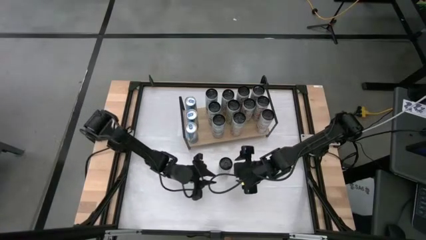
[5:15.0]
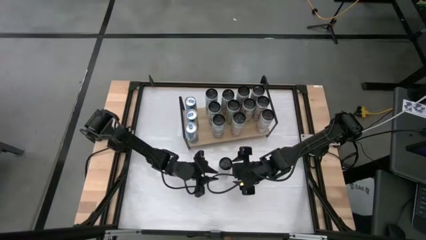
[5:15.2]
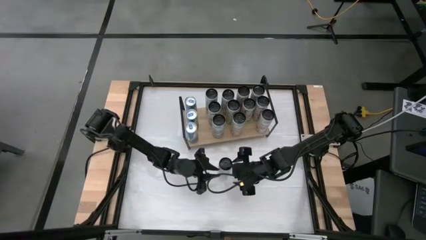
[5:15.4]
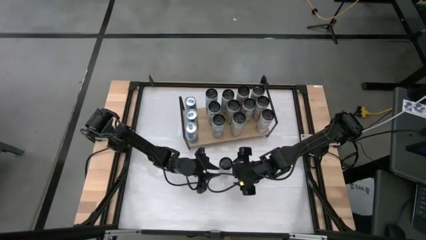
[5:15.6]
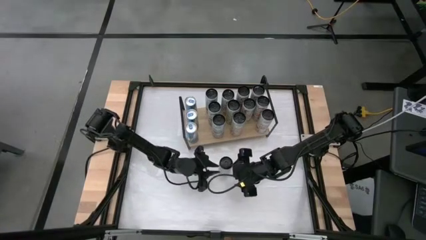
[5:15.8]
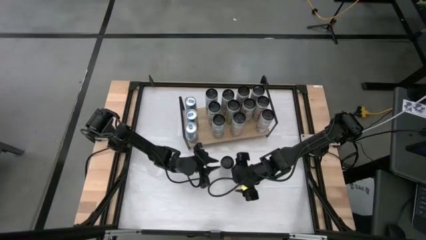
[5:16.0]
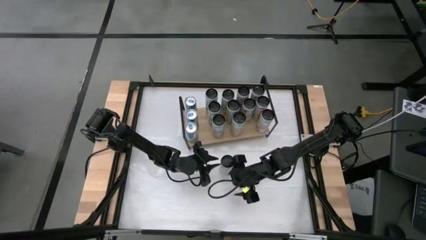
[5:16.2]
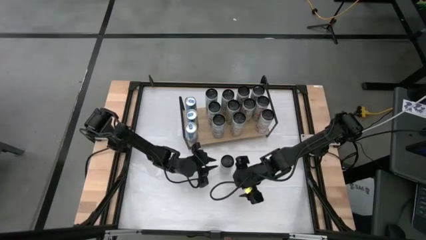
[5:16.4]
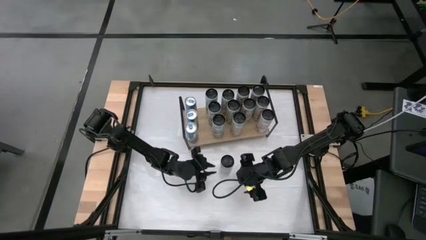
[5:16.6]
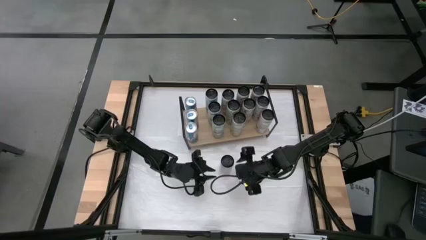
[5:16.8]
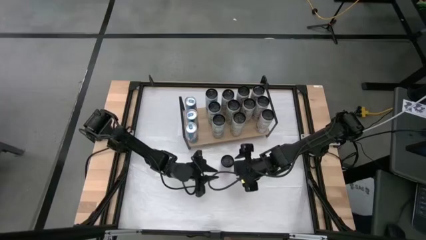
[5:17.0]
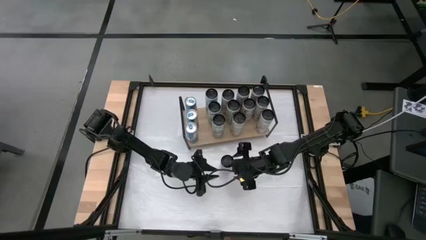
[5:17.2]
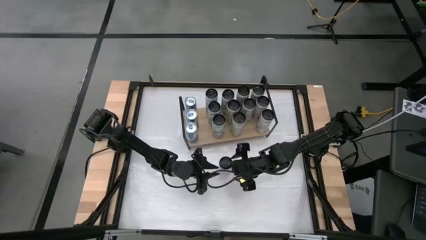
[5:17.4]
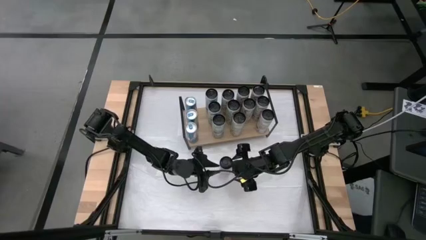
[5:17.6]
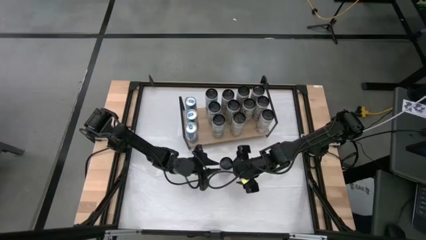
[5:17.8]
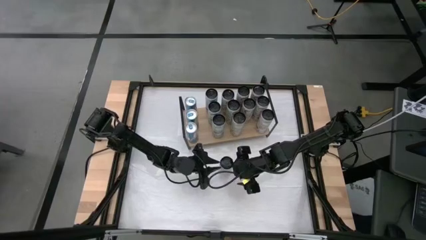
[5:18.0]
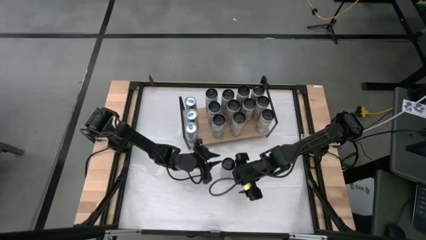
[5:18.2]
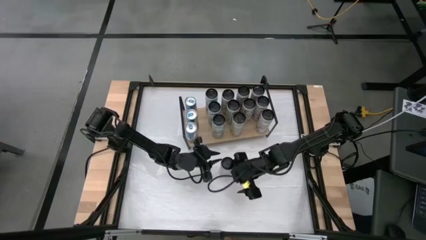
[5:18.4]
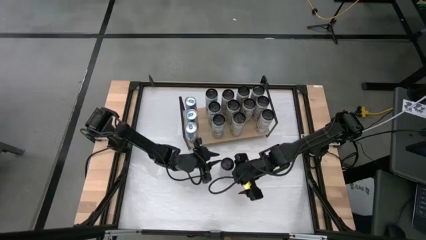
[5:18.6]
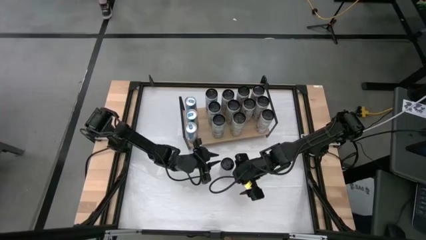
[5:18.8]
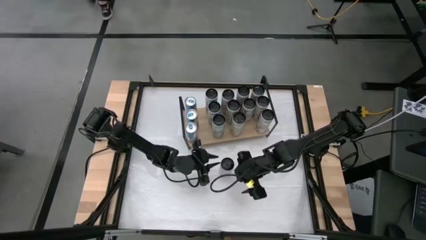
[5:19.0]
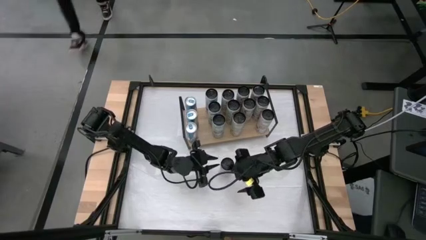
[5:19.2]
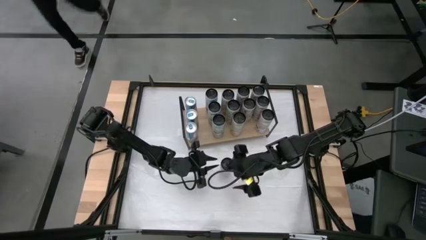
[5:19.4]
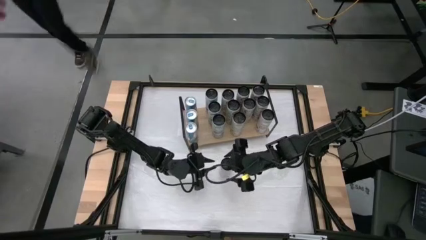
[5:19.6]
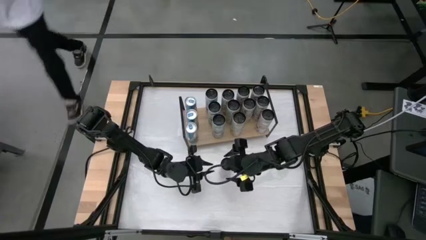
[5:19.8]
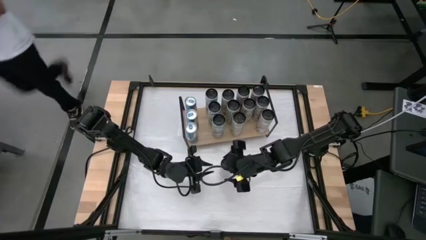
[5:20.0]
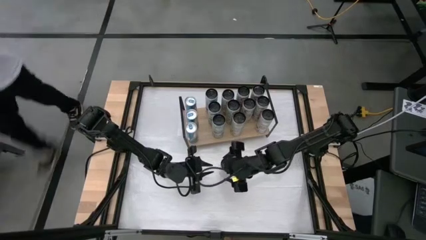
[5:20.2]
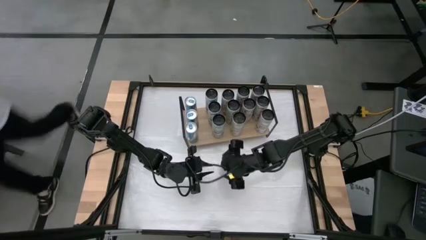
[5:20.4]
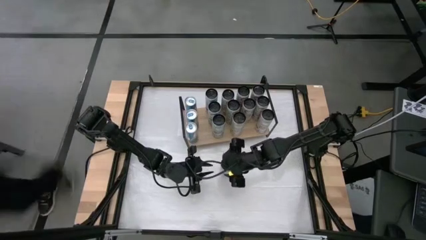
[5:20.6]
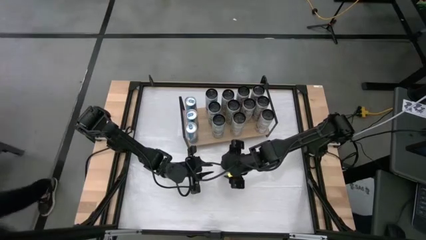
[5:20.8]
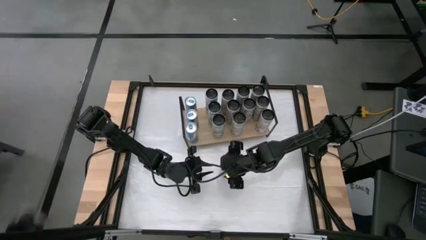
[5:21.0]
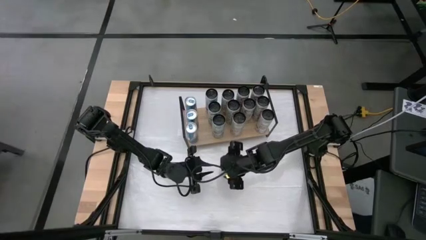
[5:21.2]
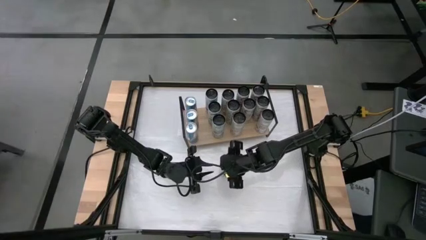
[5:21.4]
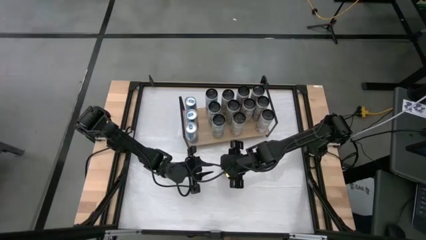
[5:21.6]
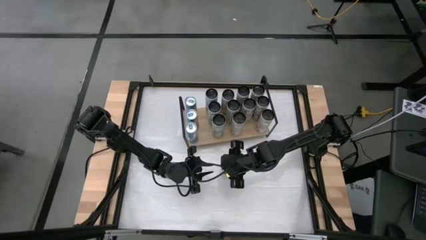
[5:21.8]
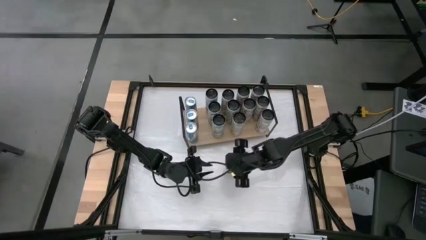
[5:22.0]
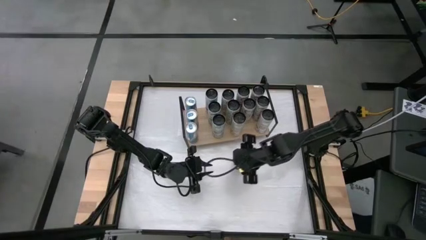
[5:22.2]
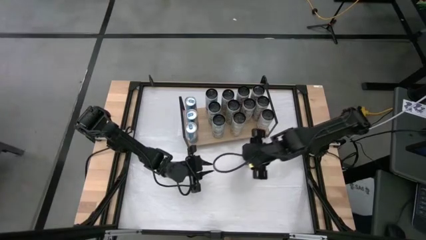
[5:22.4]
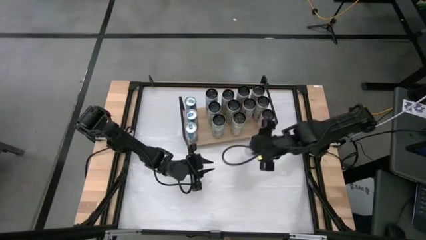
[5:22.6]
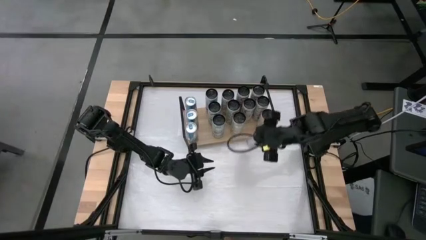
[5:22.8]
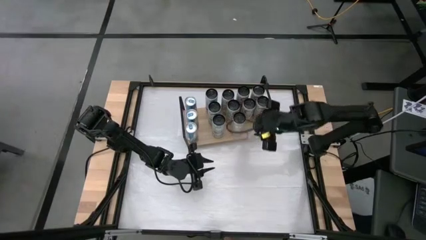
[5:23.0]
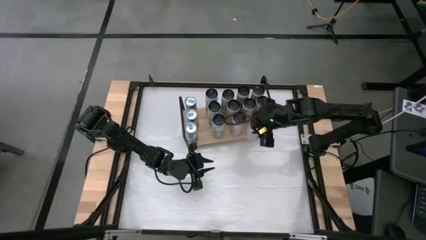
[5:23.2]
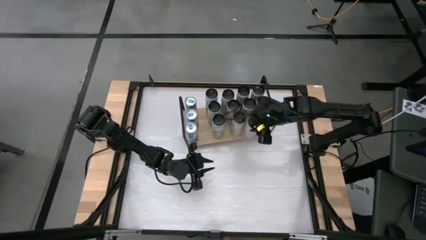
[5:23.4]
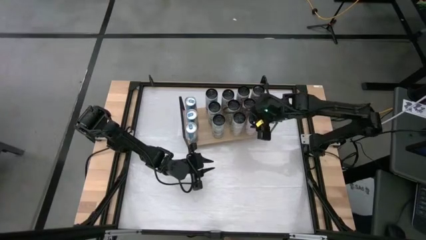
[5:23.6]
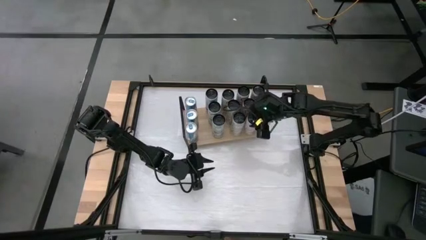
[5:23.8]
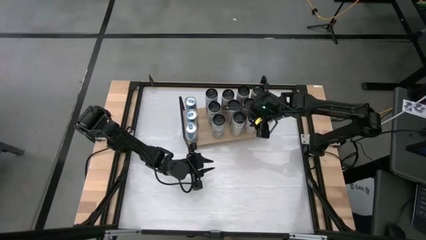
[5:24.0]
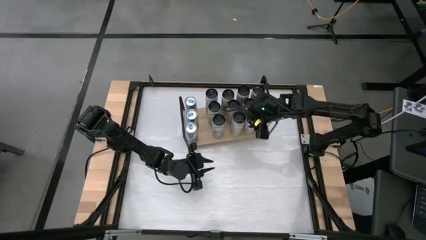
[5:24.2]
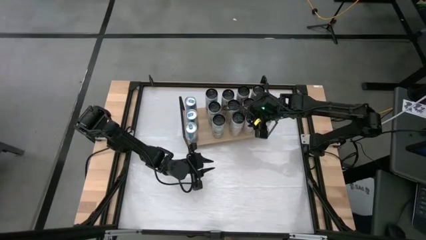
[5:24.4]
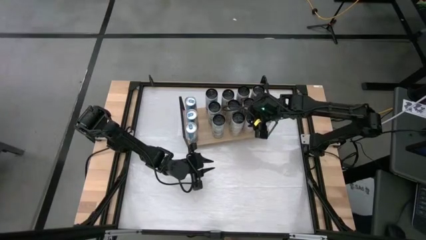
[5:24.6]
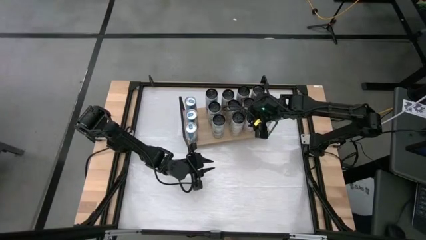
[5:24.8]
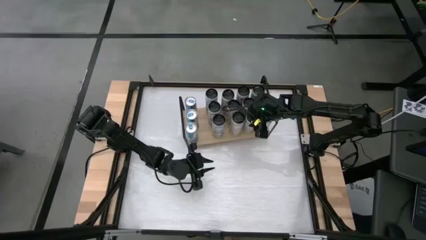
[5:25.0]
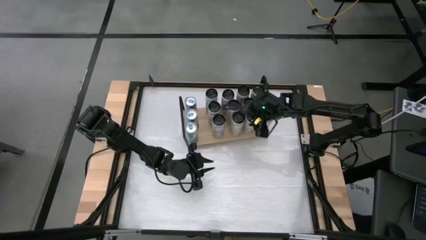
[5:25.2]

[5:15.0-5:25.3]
Task: Place canned beverage on shelf
Put the white-pink soda can on the shelf aligned with the other white-pink soda can

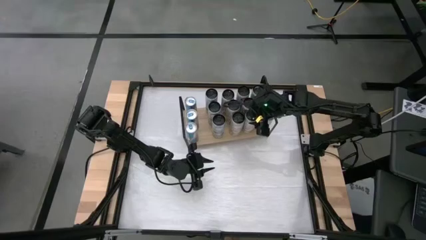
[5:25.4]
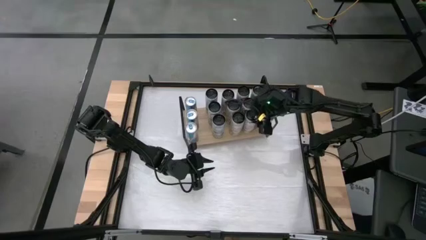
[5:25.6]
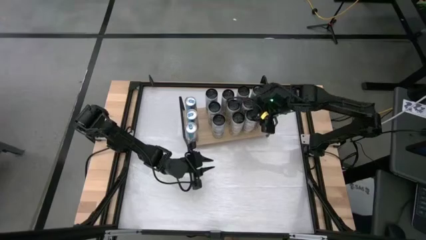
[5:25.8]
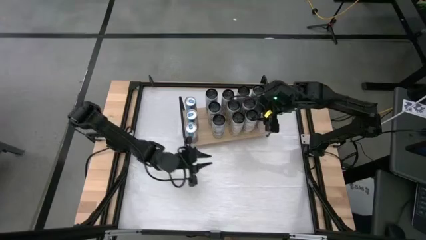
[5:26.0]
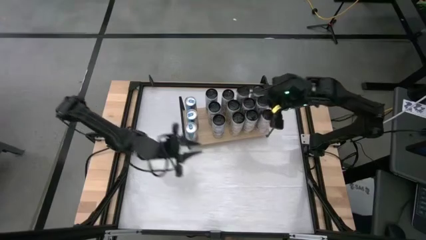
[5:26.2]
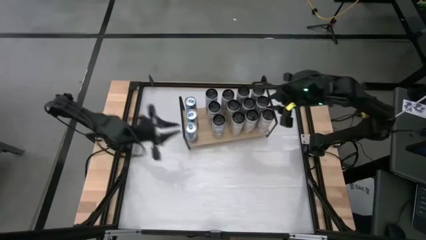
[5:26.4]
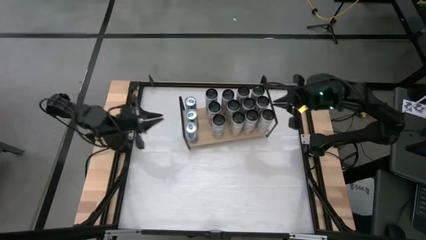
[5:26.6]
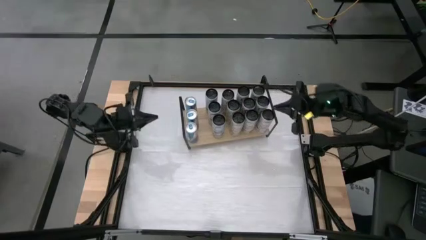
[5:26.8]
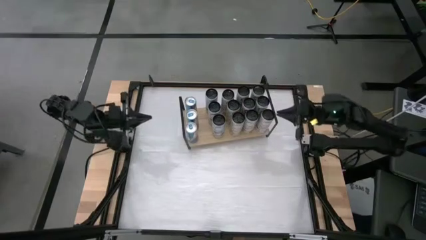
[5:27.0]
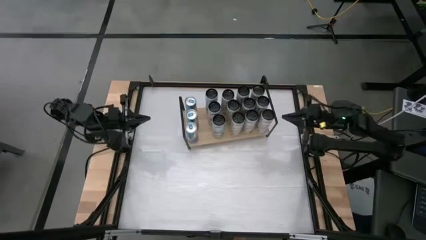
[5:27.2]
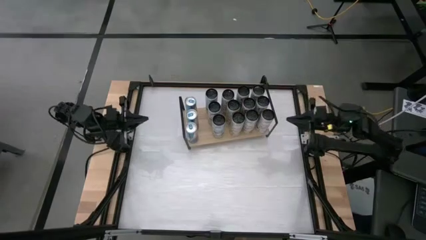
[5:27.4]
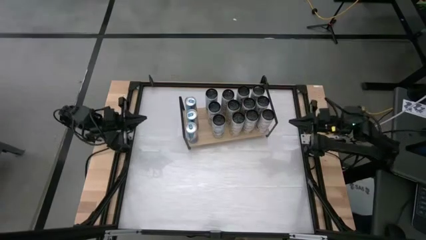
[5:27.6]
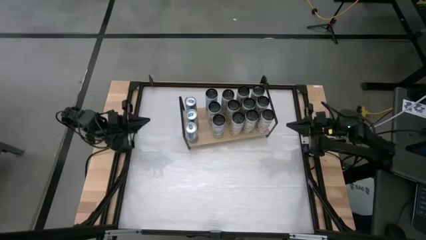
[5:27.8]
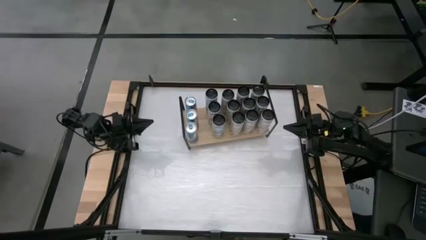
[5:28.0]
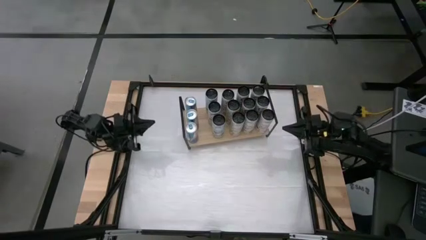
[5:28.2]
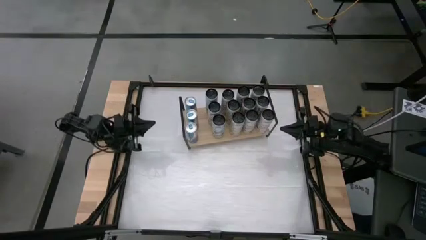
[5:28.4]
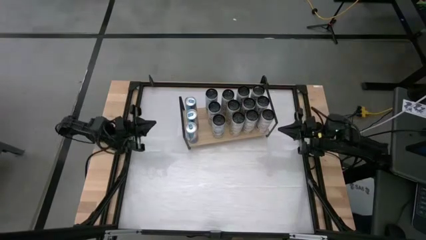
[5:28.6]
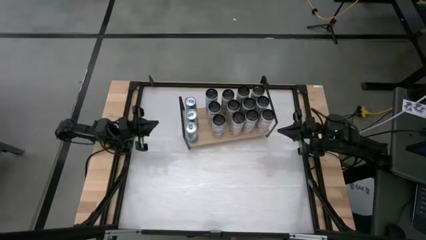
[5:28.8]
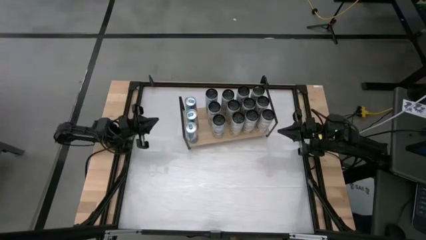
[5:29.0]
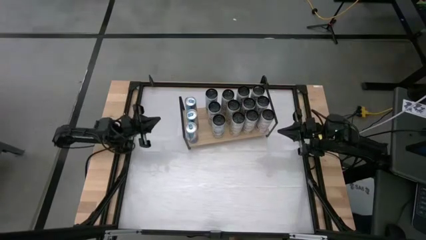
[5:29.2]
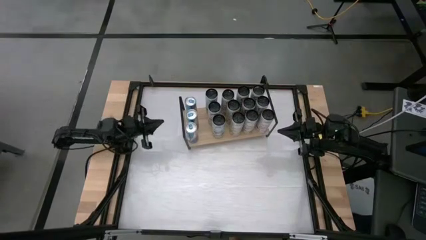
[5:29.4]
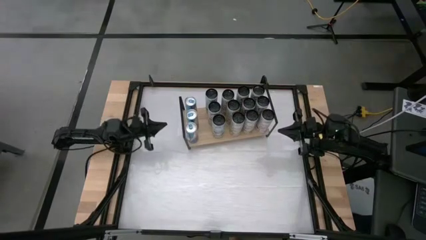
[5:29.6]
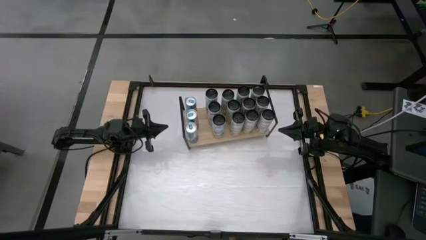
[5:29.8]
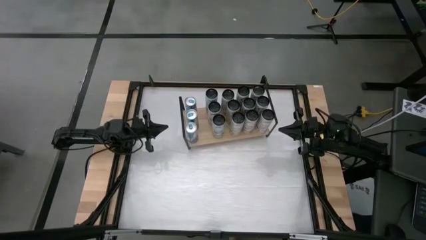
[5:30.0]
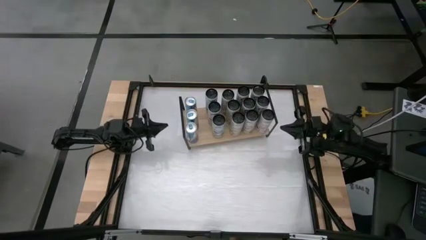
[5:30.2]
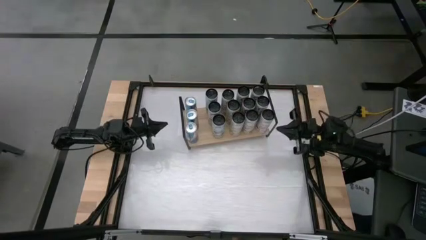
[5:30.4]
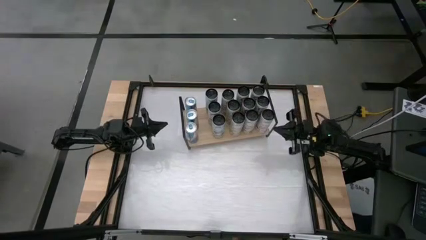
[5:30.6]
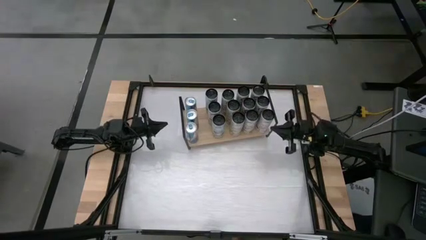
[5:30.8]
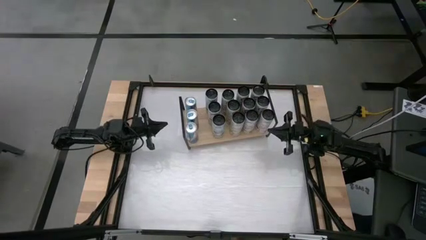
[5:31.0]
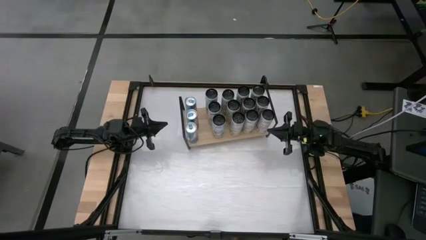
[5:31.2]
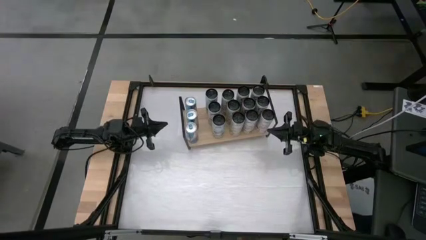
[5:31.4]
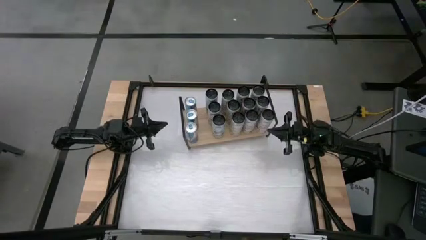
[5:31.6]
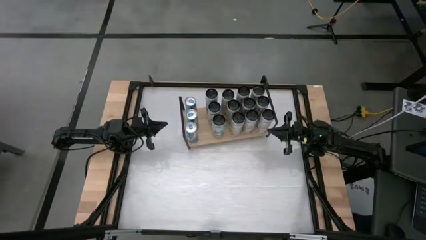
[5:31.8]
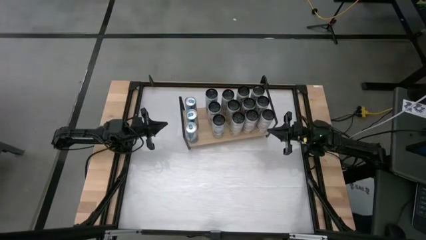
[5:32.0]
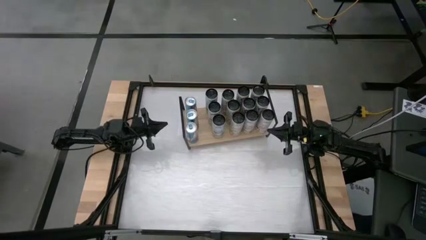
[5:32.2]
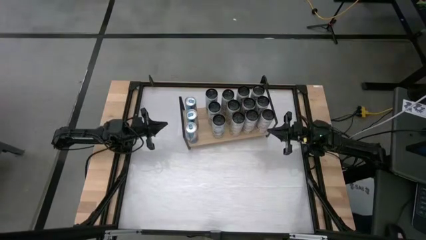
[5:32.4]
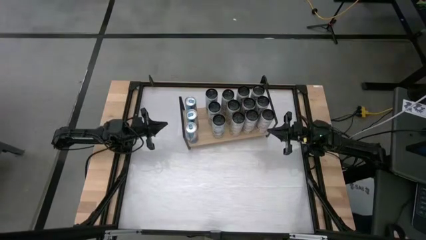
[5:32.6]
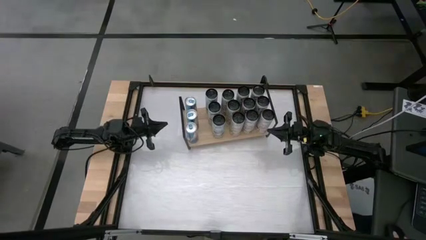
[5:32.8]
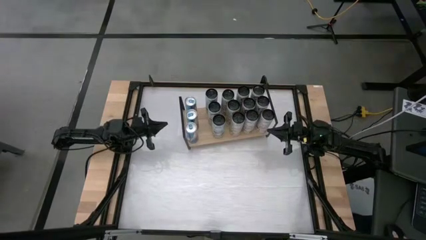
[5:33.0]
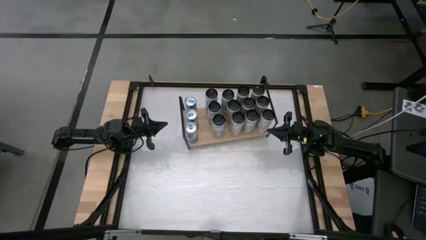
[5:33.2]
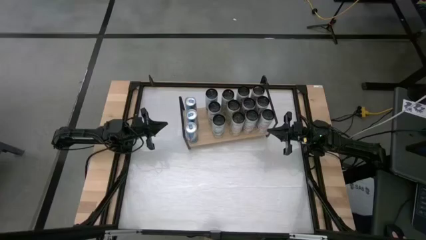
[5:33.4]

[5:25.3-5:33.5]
Return to Home Position
